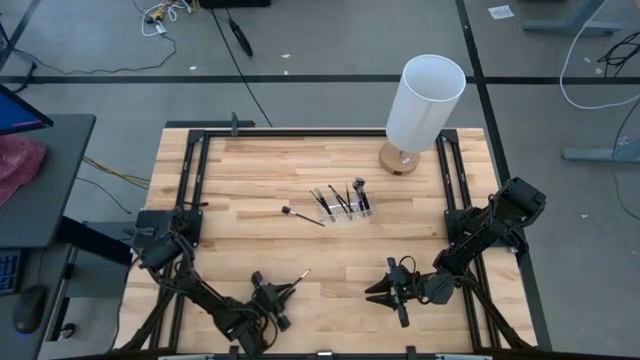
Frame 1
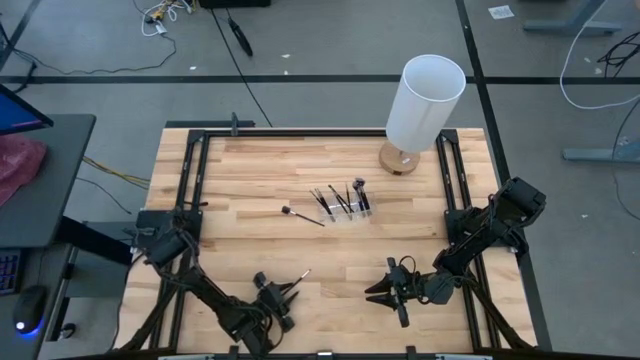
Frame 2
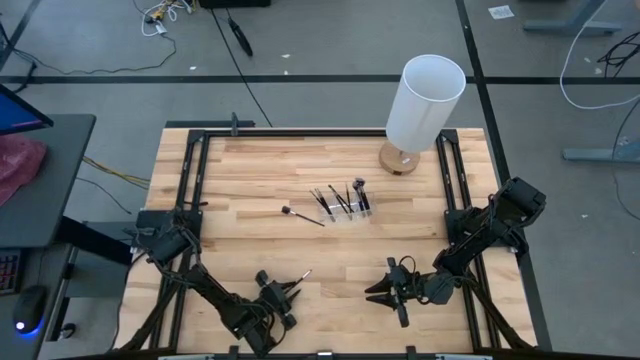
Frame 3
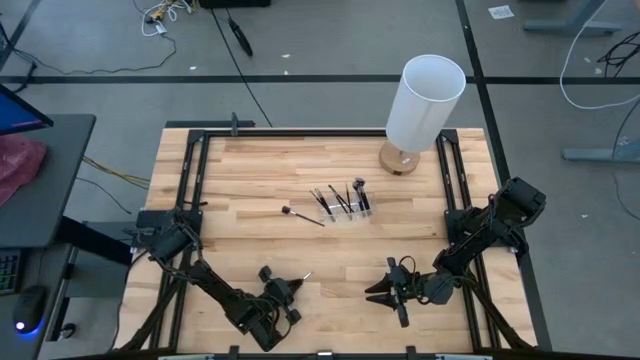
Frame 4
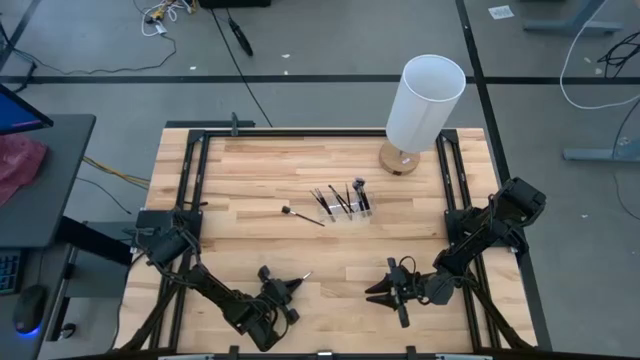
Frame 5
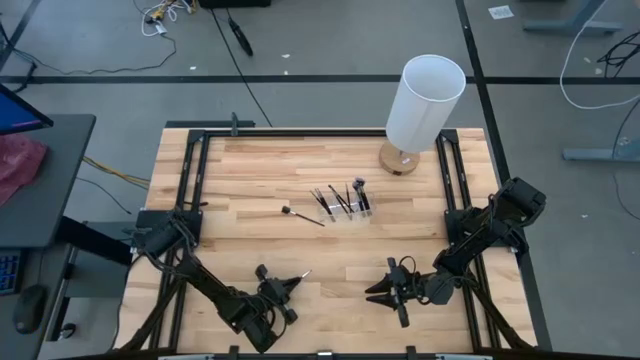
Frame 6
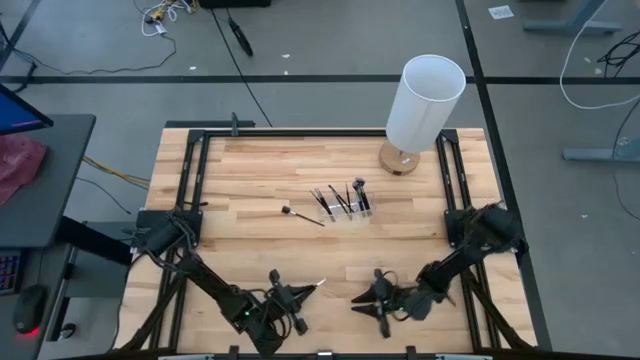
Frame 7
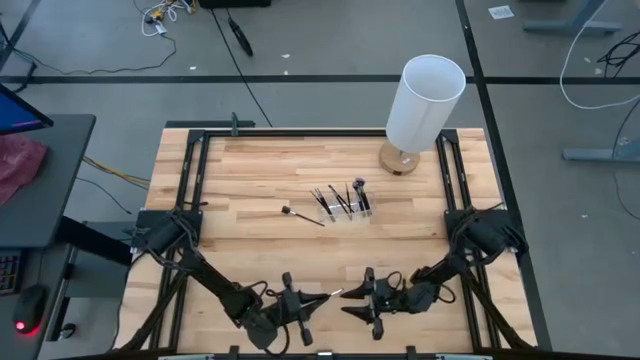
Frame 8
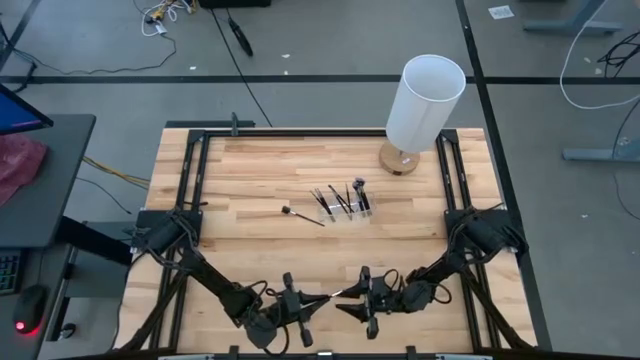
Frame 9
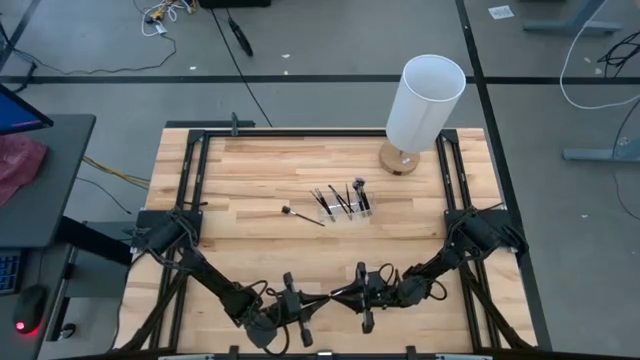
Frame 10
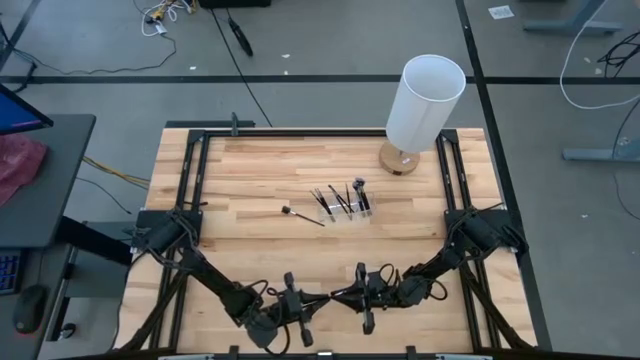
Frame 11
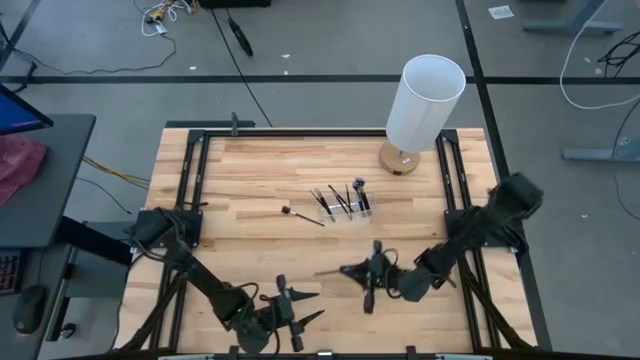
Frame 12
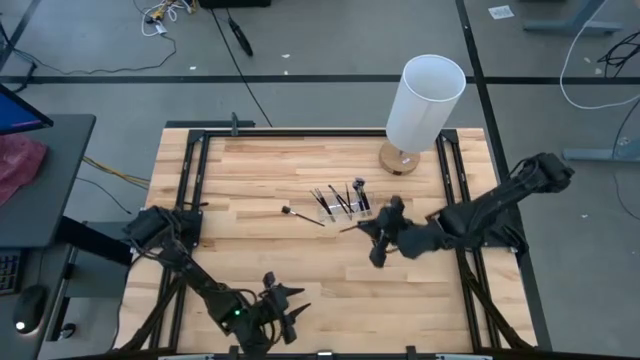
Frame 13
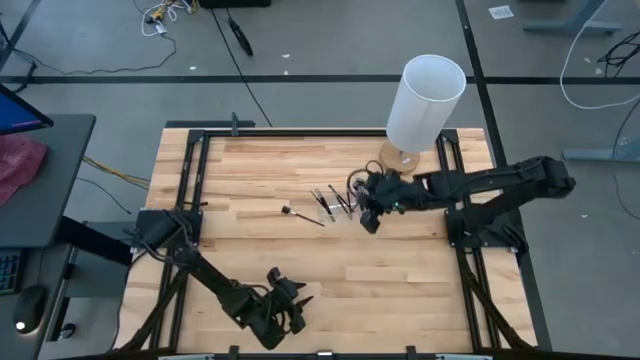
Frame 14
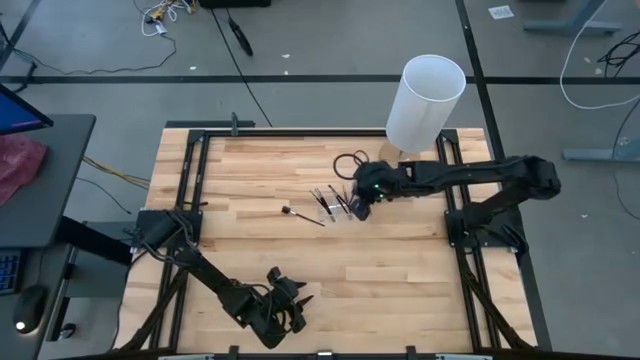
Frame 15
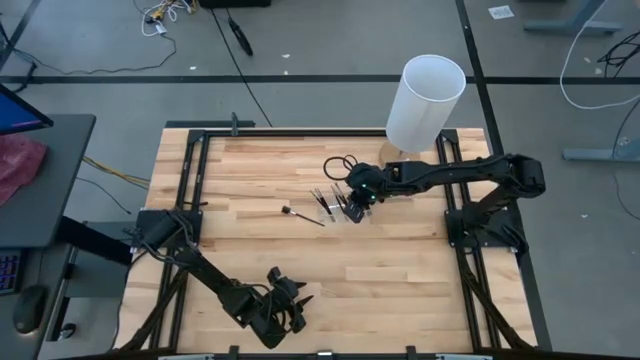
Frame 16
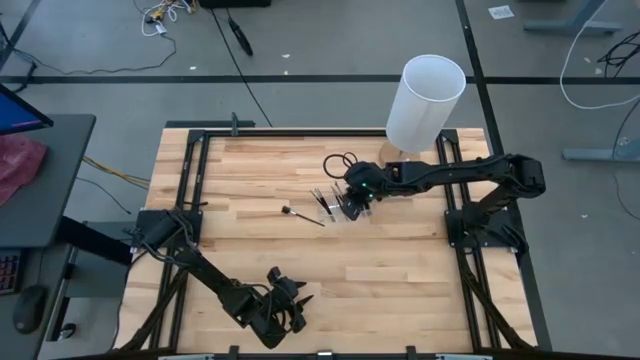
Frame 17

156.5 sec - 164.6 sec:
Task: Pick & Place Makeup Supplies
Put the black makeup brush into the transparent organizer

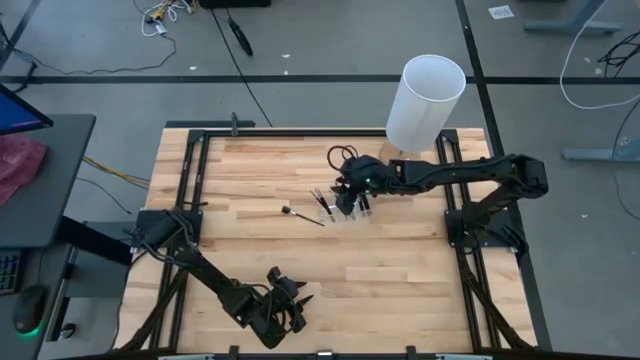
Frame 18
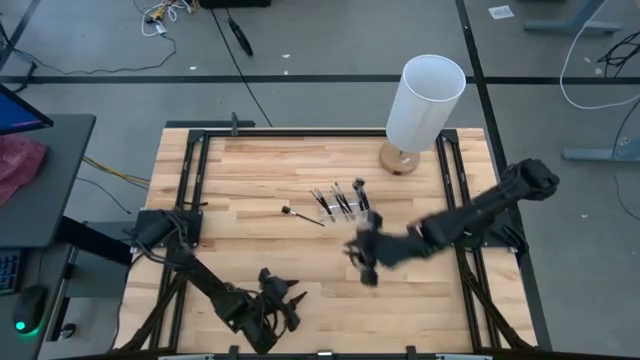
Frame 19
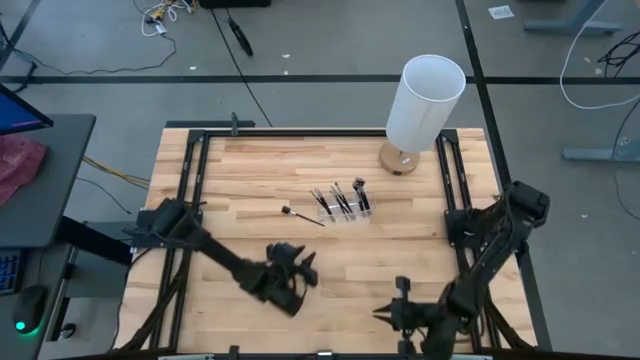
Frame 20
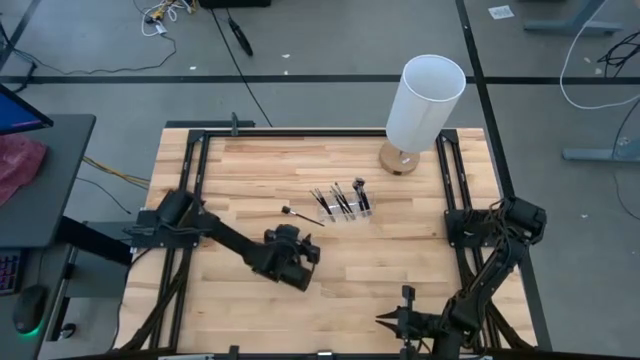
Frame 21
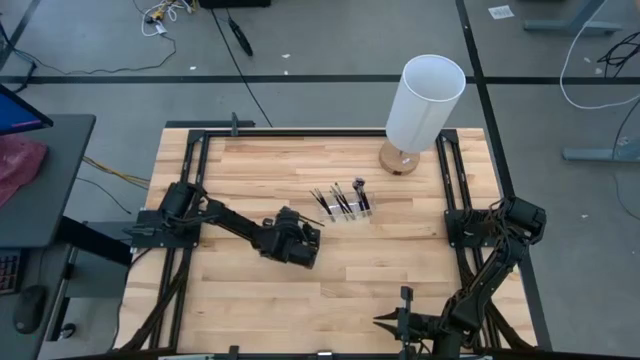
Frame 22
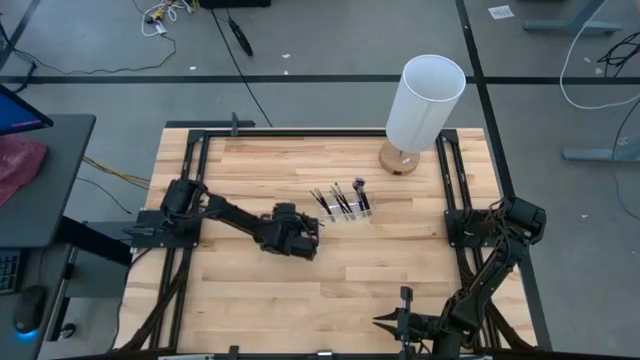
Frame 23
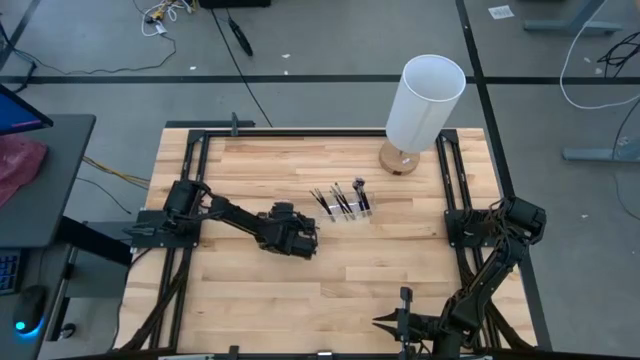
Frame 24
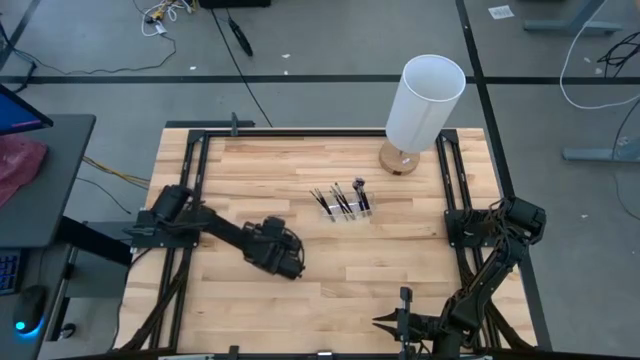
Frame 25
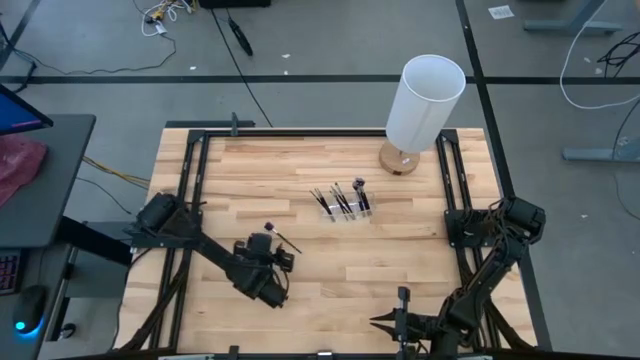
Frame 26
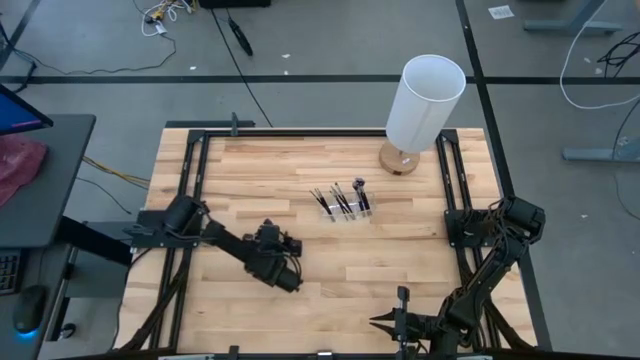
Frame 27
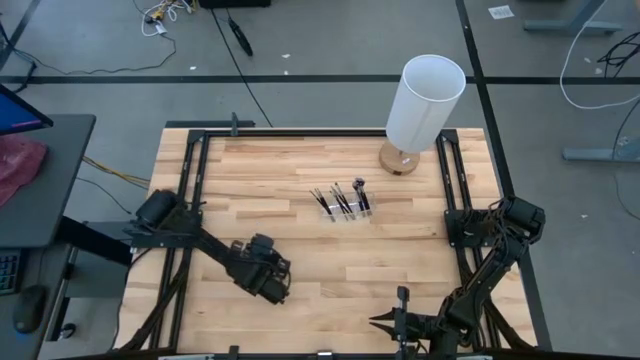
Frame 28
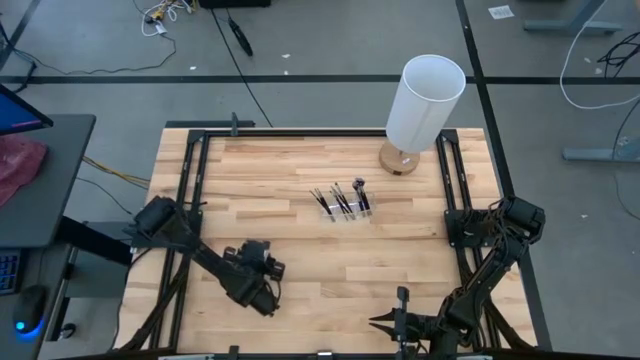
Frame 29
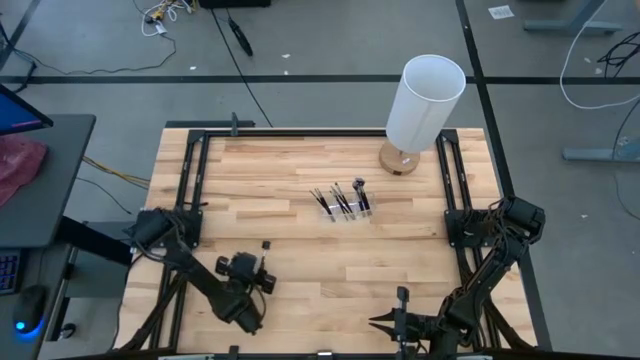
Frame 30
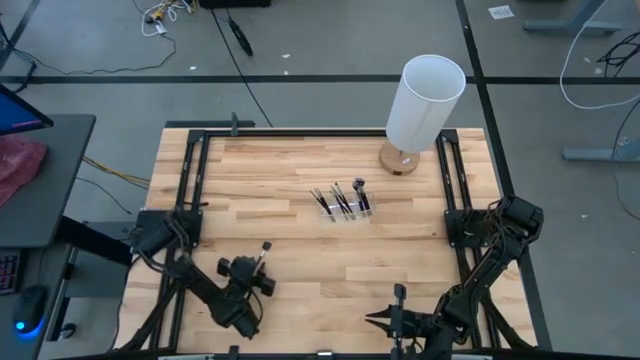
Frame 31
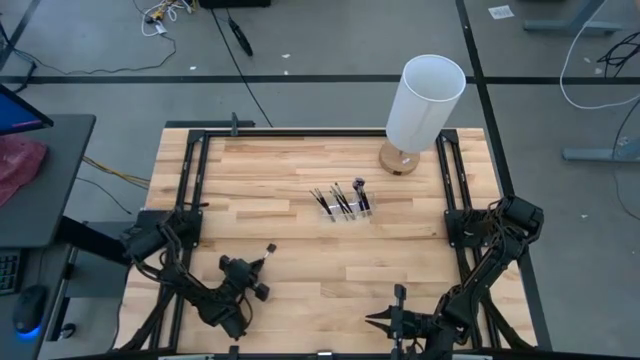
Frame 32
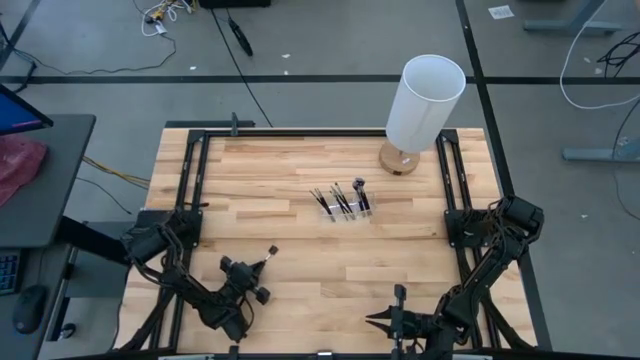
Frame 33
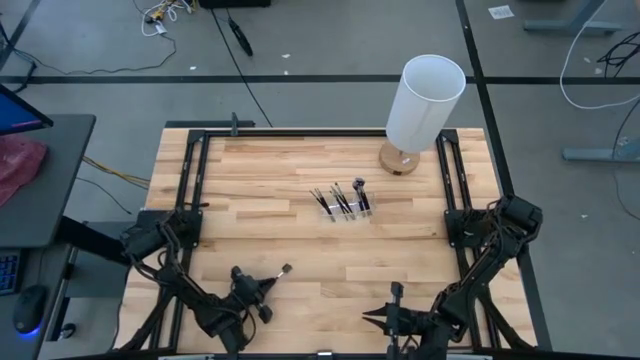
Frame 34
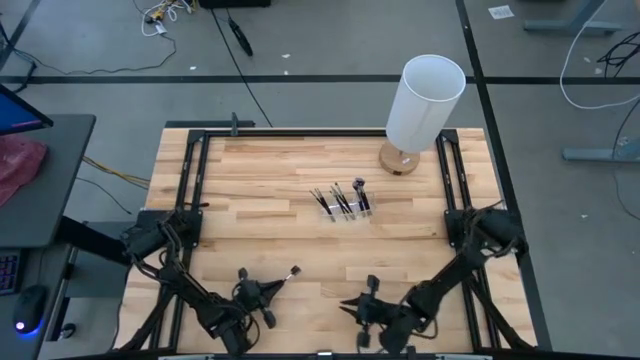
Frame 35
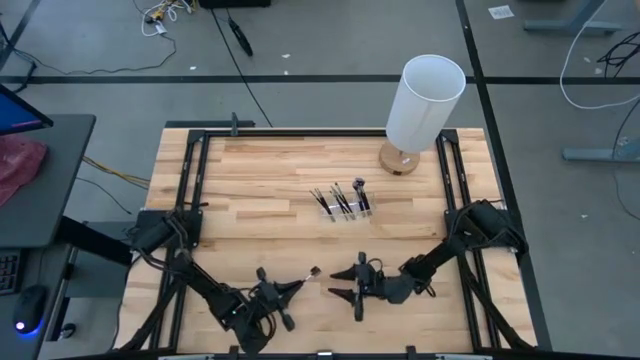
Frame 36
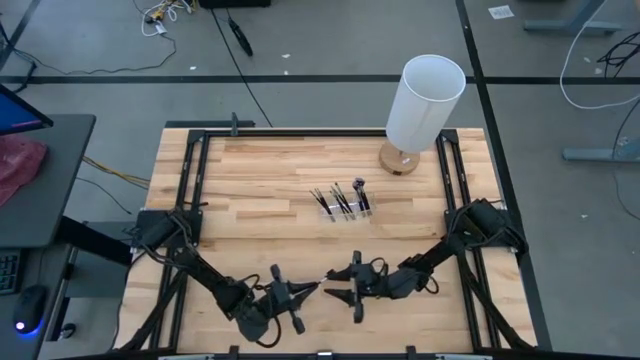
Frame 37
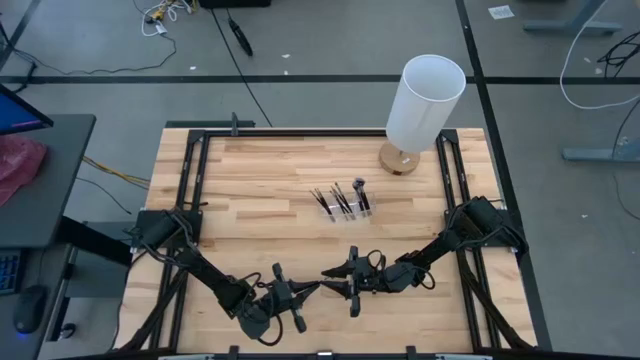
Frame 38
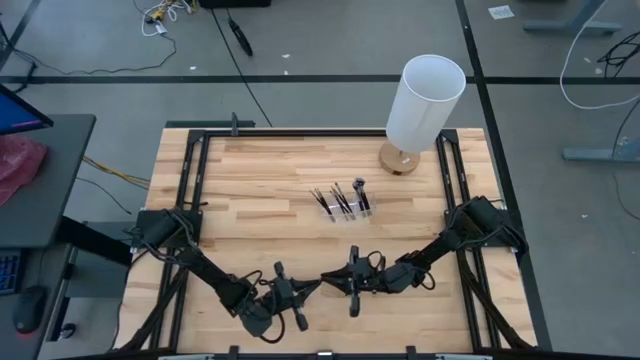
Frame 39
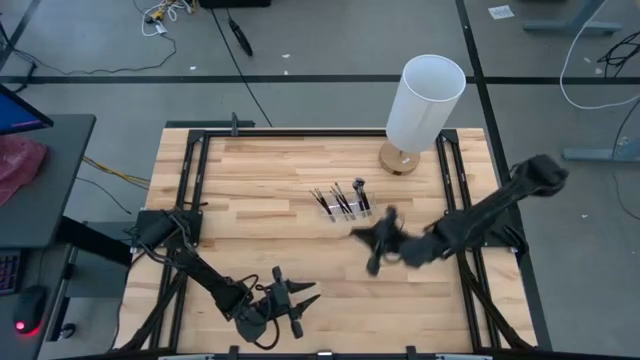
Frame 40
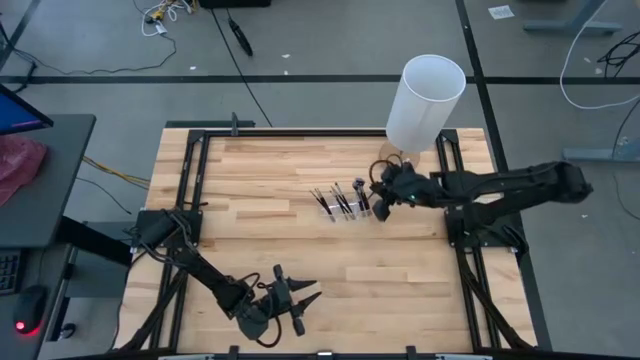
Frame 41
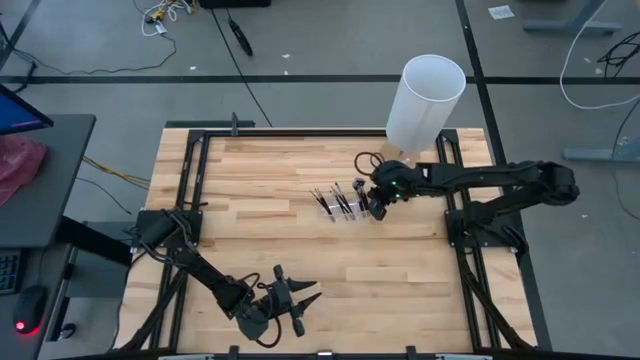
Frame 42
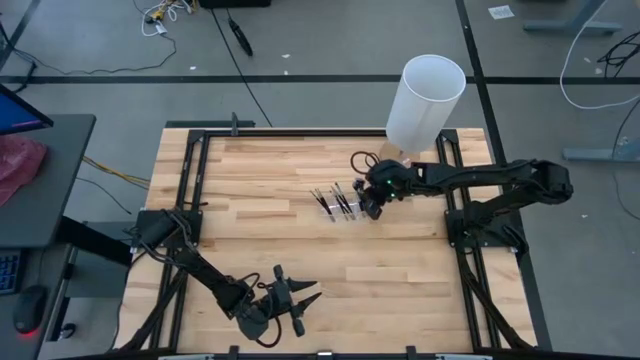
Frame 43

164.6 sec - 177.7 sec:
Put the black makeup brush into the transparent organizer

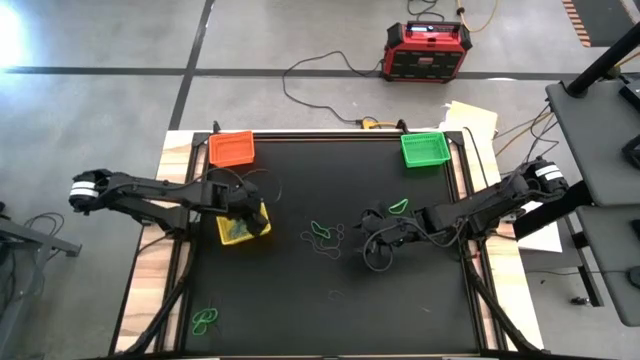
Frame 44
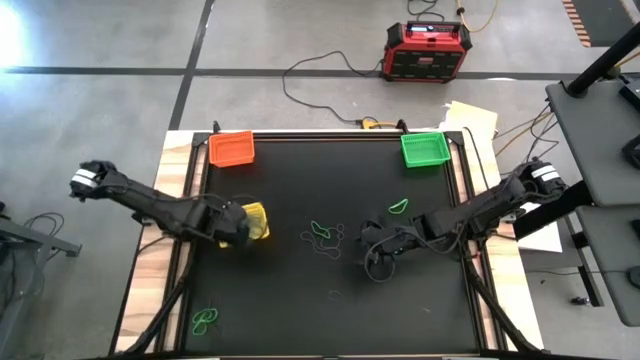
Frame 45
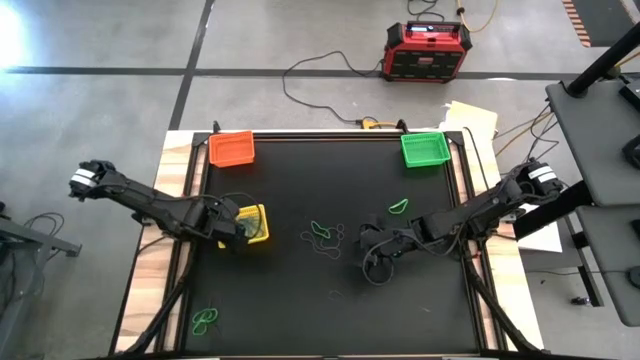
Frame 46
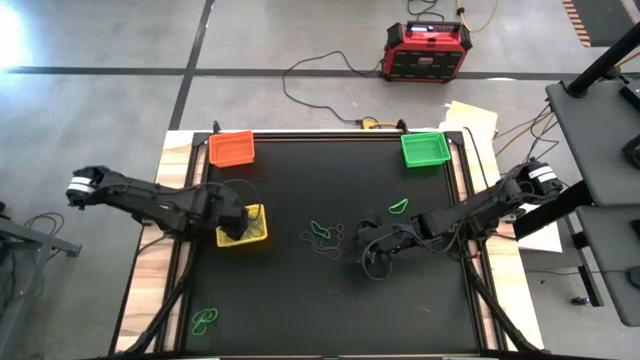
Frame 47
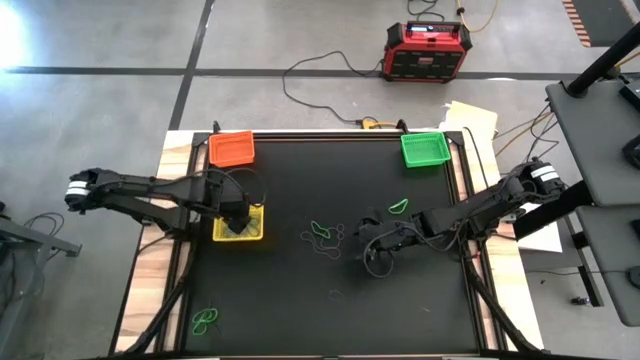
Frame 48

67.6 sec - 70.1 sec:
Task: Sort rubber bands into baskets
Adjust the yellow bin
